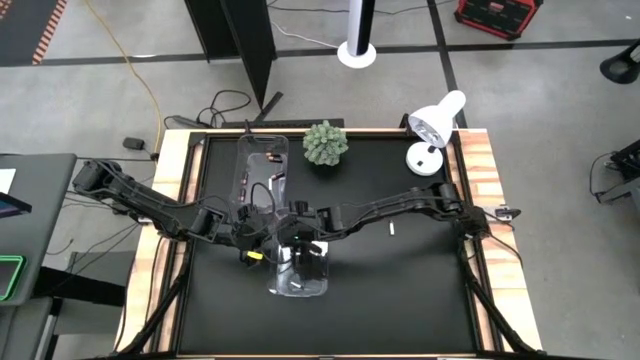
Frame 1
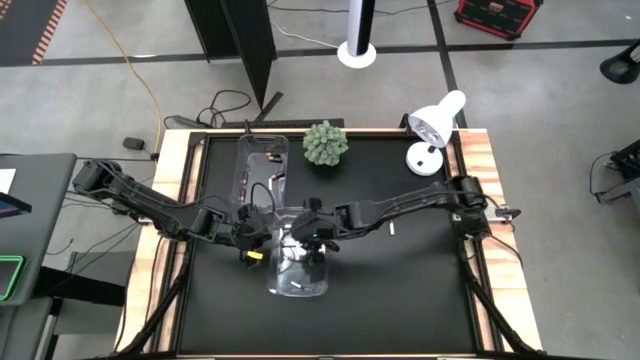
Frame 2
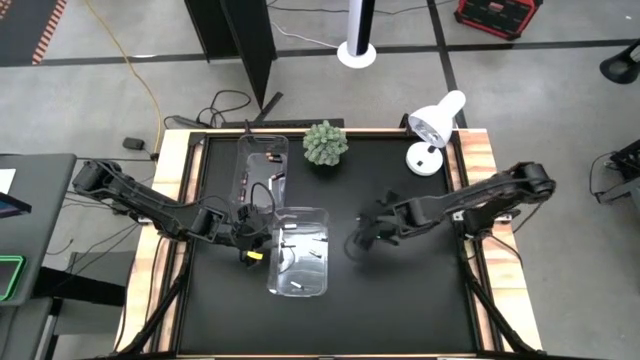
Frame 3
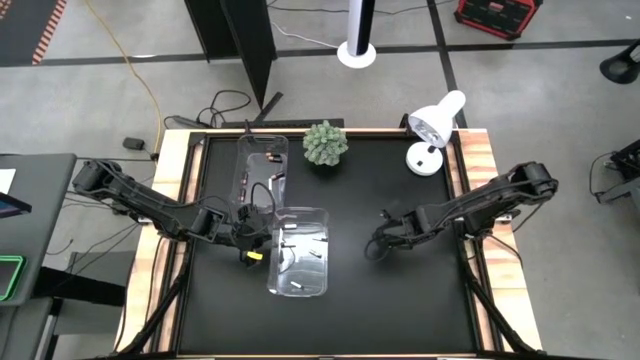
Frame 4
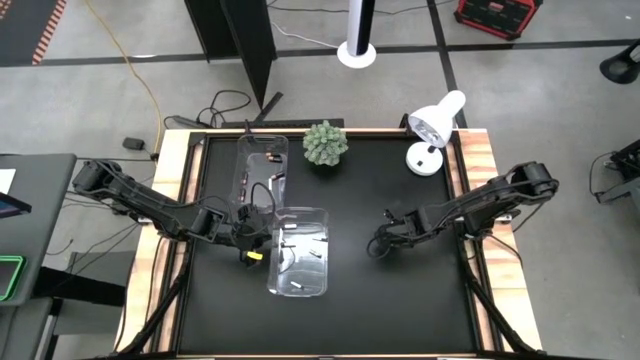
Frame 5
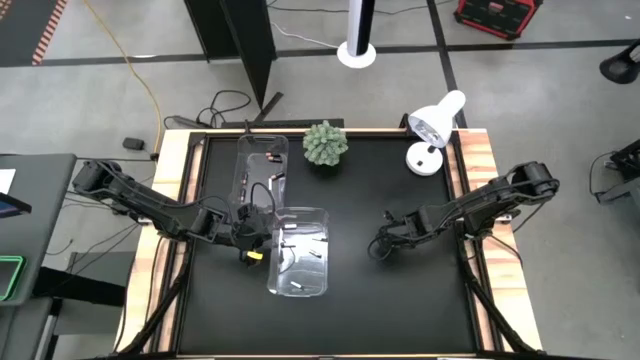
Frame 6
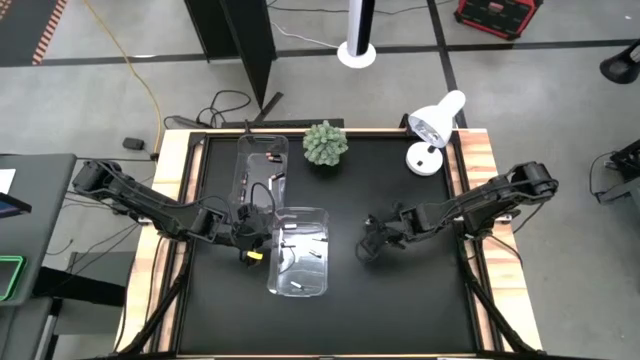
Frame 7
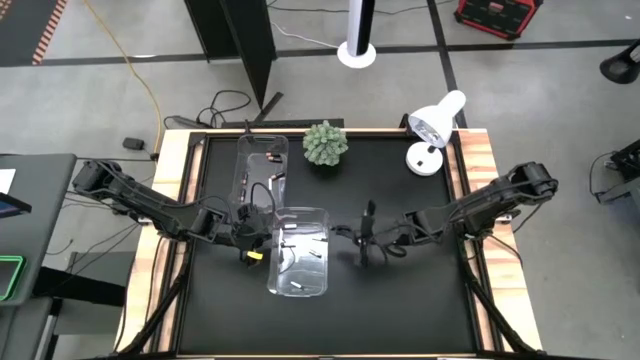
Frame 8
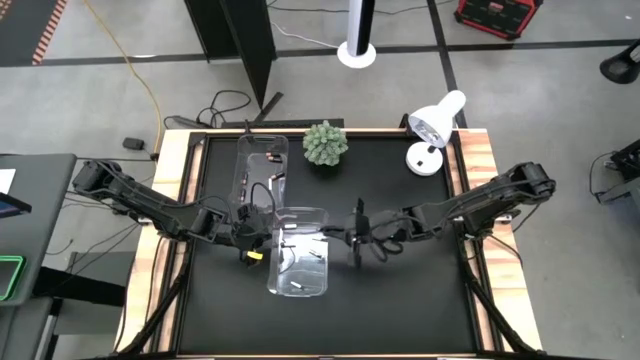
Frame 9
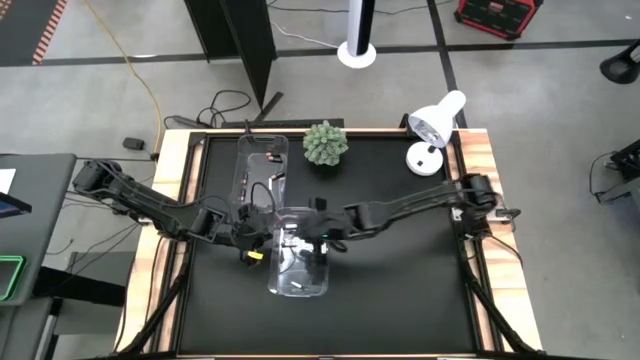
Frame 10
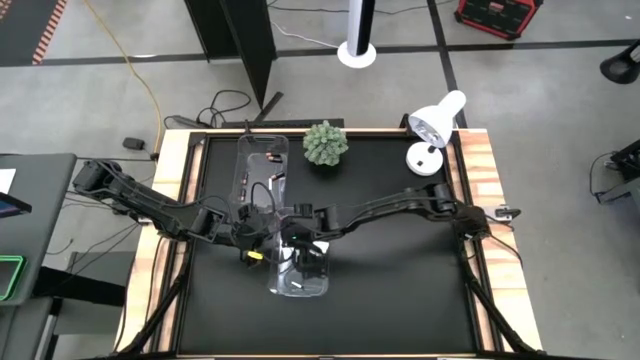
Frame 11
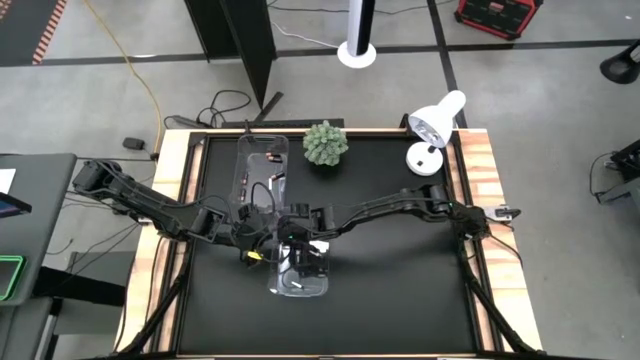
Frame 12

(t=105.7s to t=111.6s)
Task: Sort batteries
Put the silver and black battery into the center transparent bin

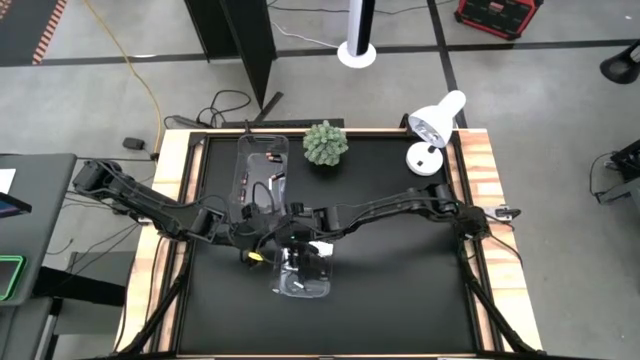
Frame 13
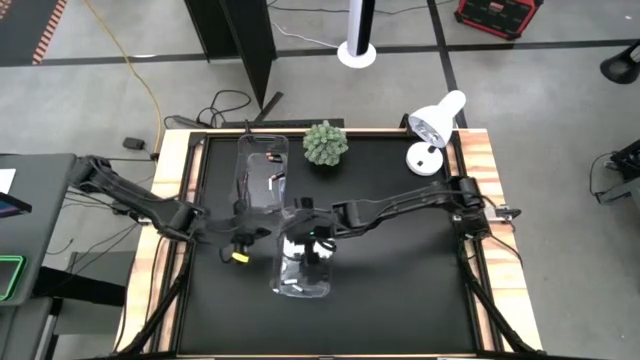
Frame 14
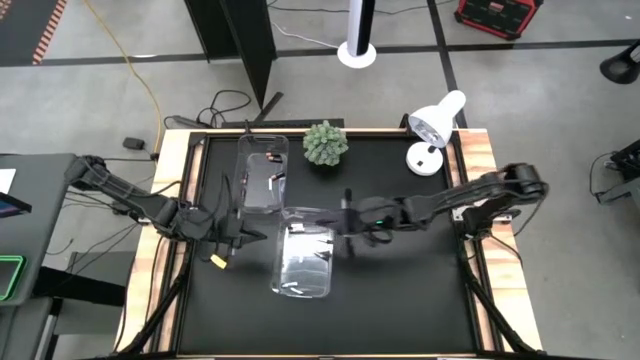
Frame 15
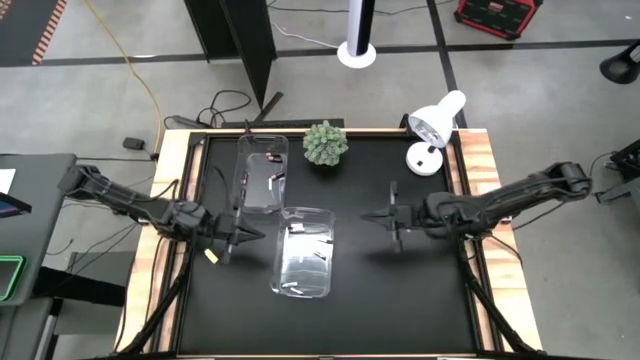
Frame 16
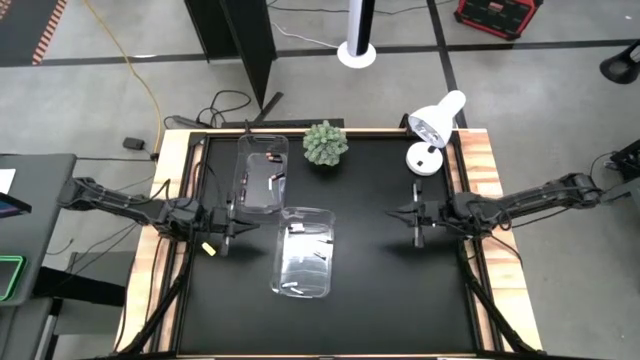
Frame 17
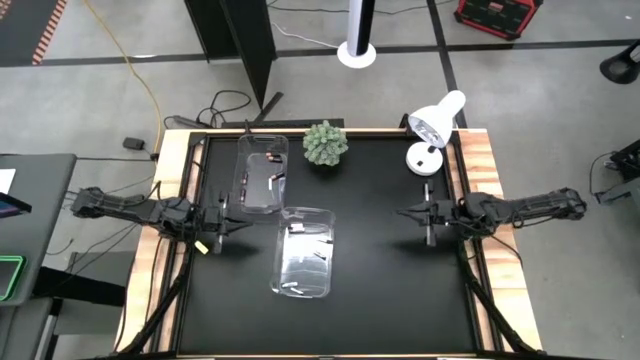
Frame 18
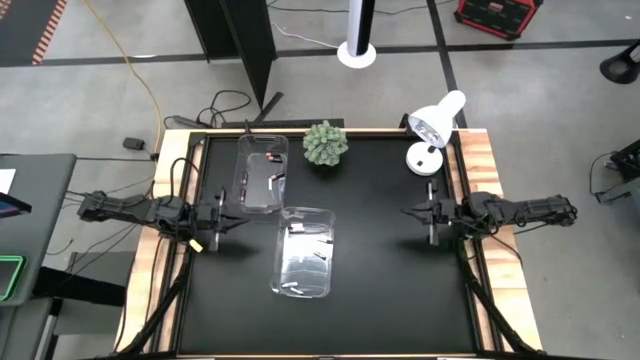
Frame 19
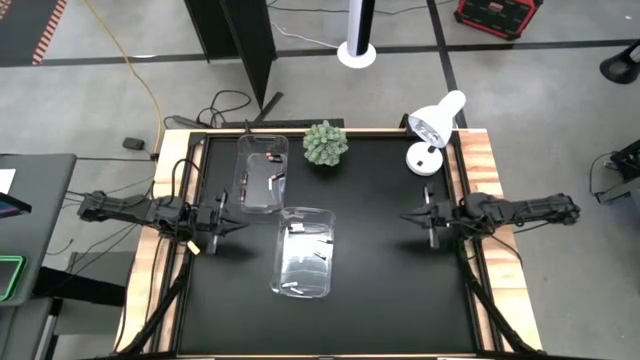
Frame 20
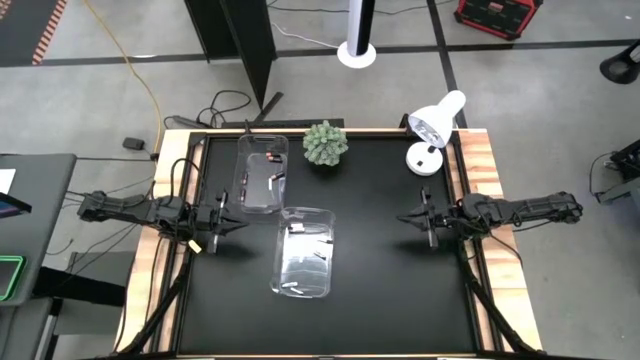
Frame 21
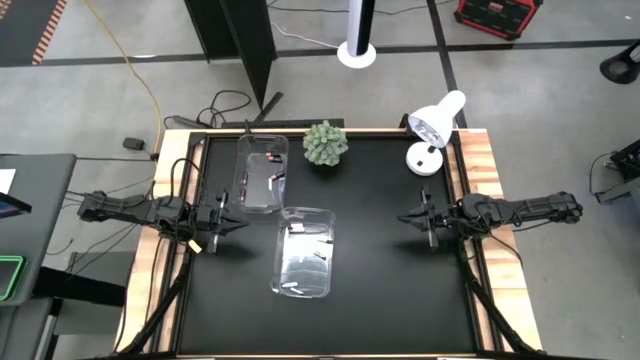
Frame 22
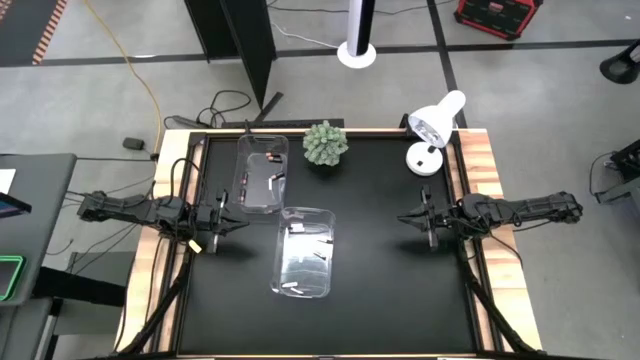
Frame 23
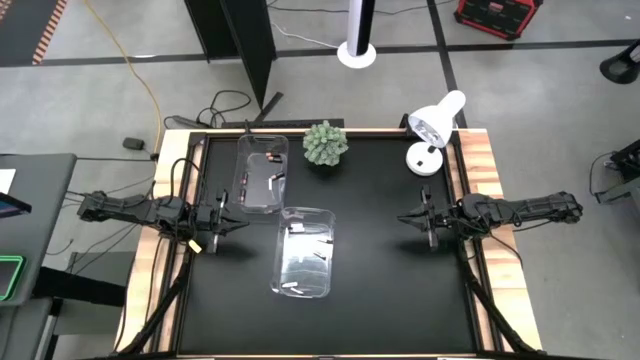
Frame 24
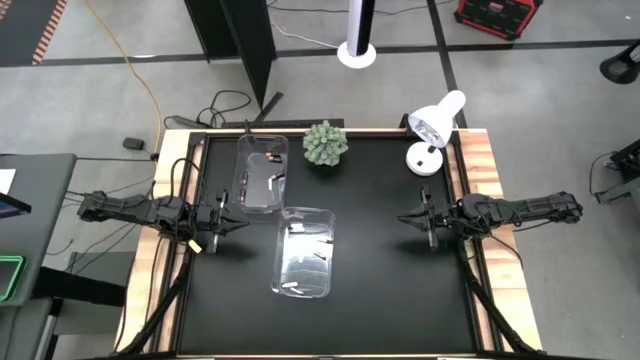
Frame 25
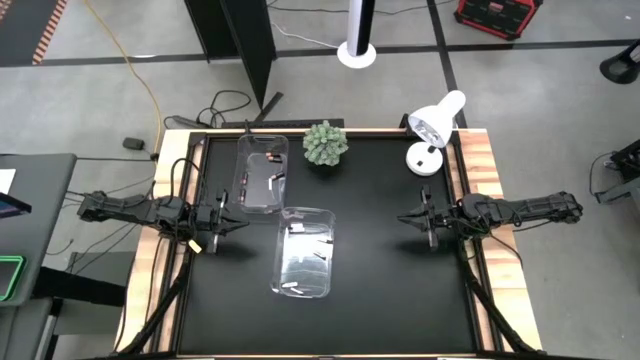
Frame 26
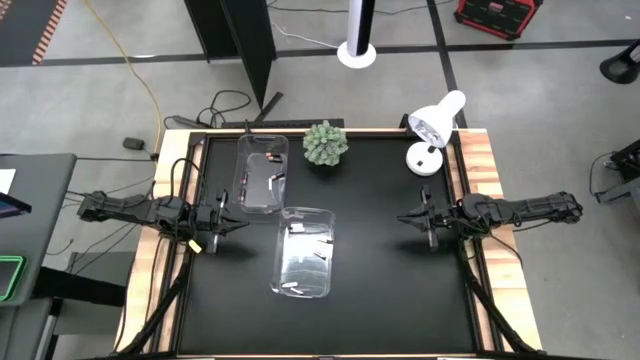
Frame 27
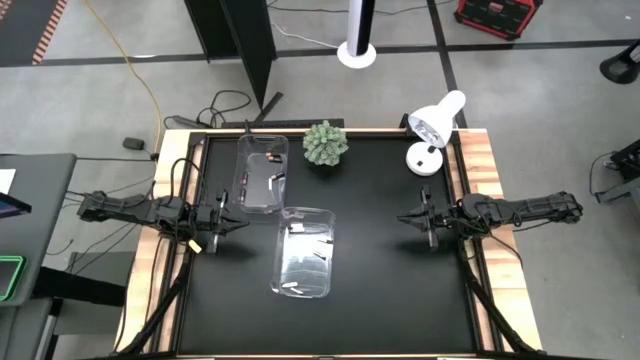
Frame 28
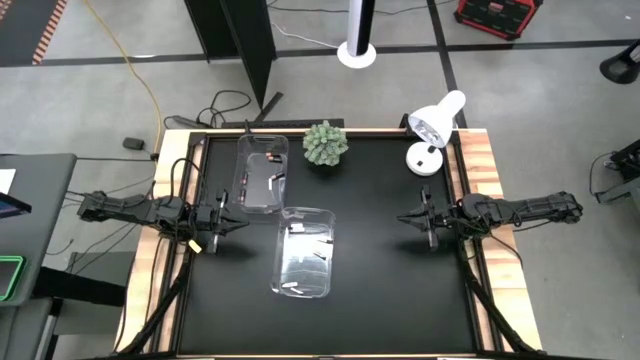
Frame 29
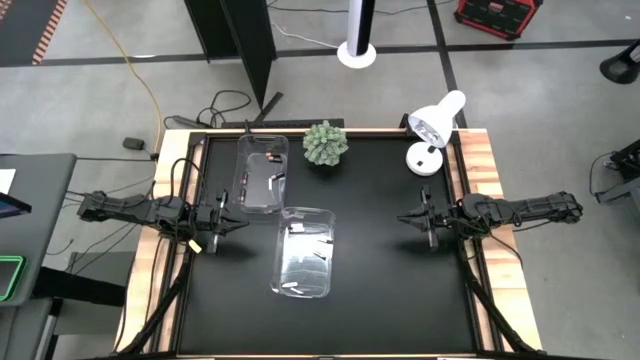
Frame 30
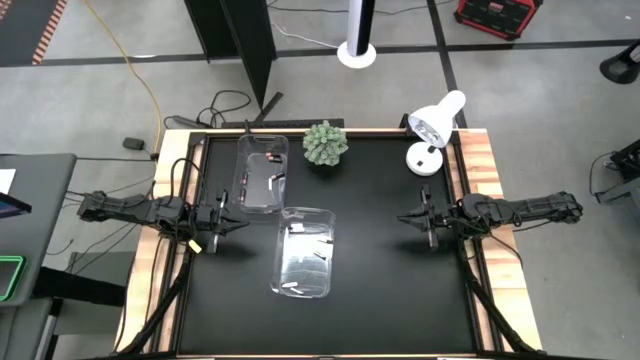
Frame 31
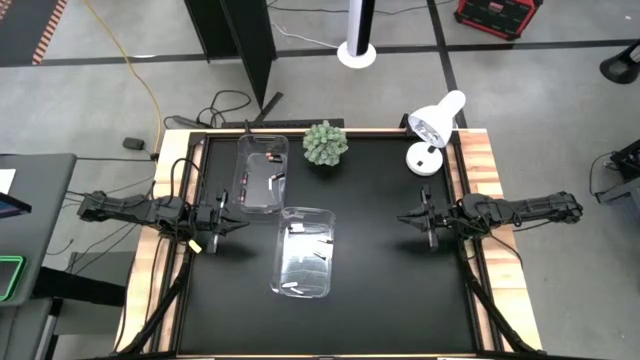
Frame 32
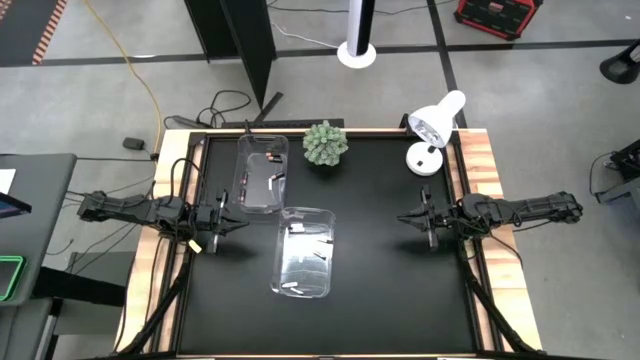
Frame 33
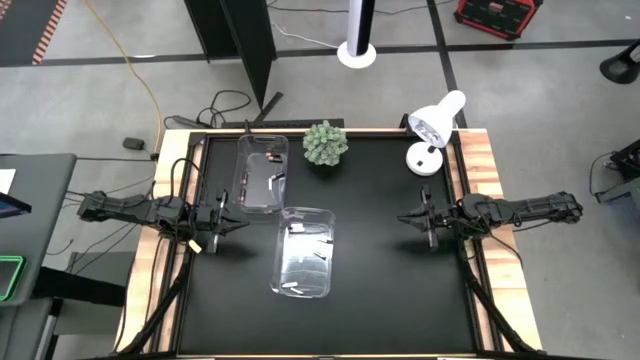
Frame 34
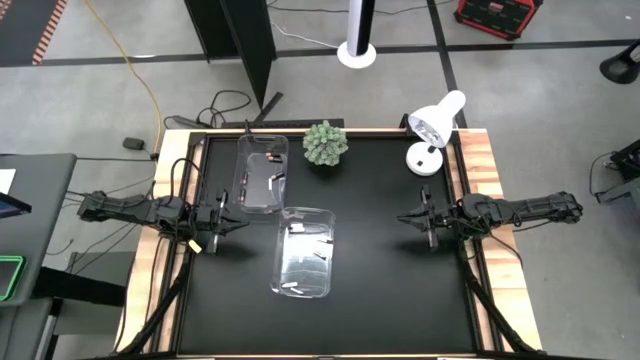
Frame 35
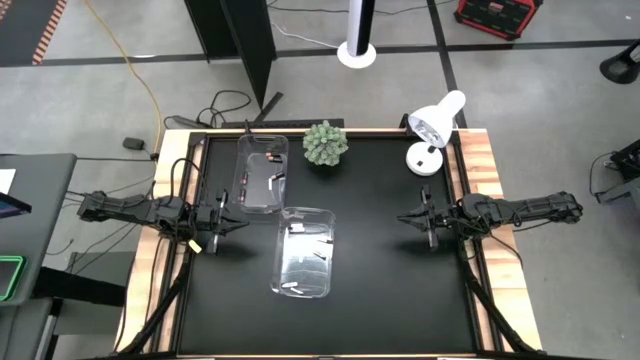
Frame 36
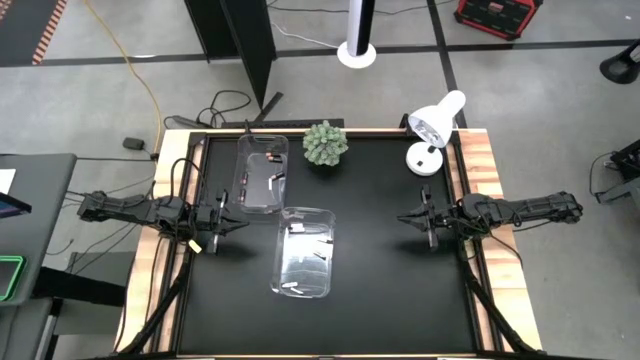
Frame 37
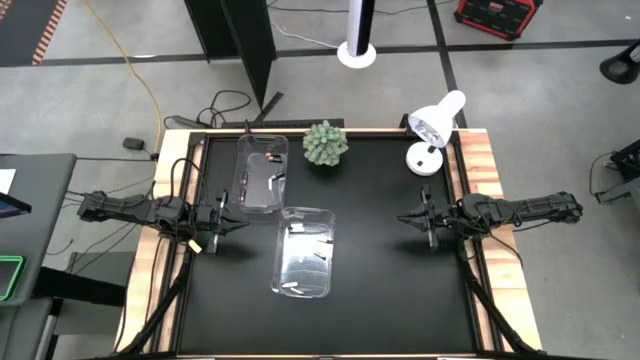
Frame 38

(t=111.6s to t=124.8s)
Return to Home Position
